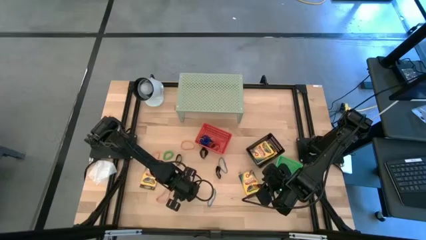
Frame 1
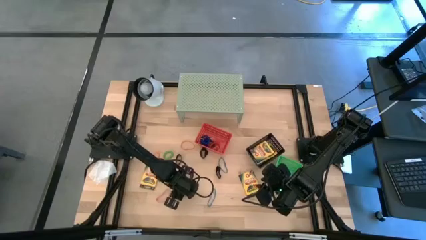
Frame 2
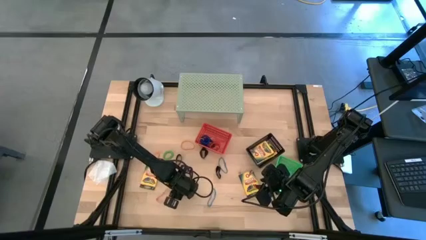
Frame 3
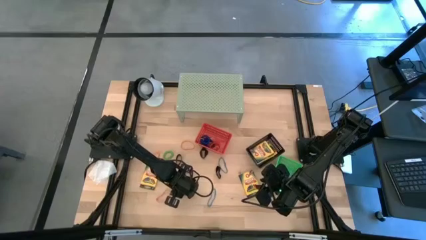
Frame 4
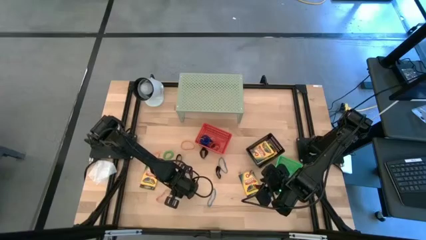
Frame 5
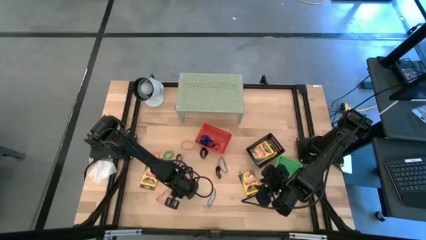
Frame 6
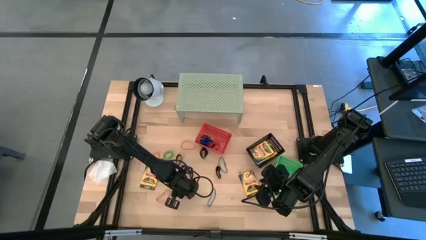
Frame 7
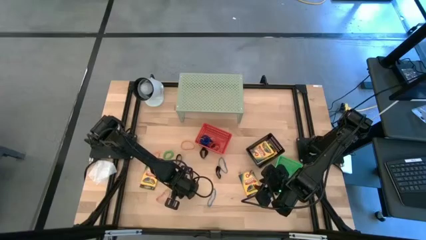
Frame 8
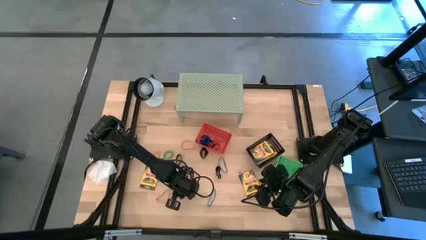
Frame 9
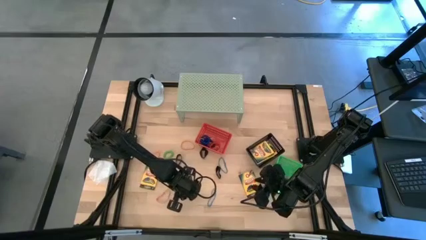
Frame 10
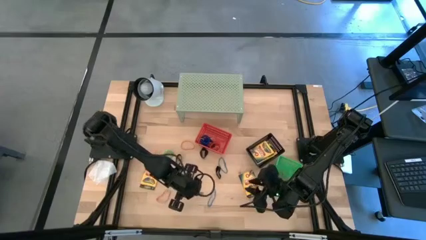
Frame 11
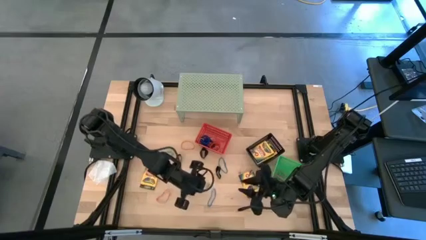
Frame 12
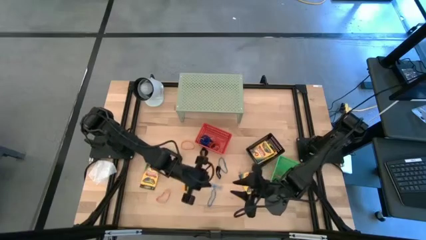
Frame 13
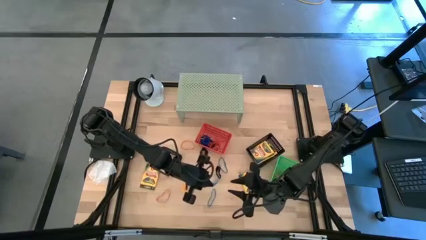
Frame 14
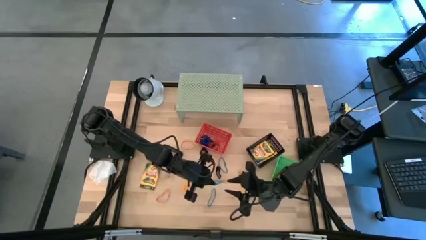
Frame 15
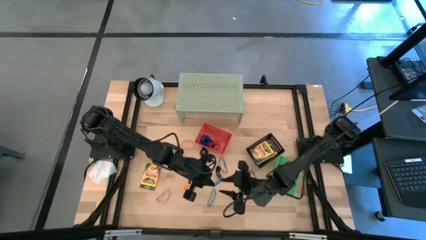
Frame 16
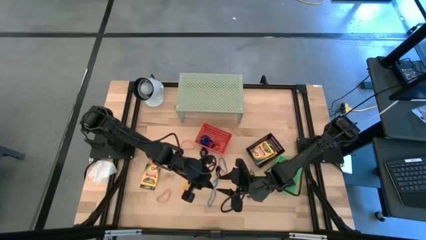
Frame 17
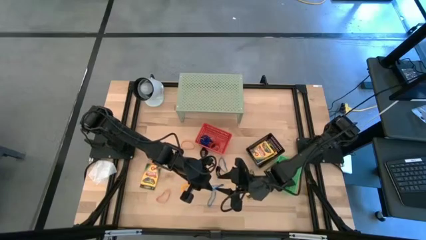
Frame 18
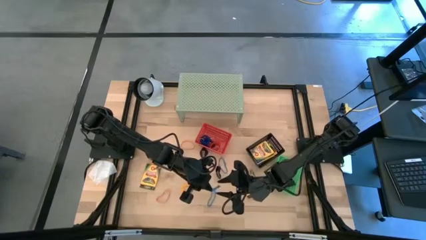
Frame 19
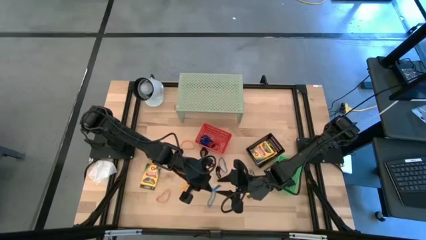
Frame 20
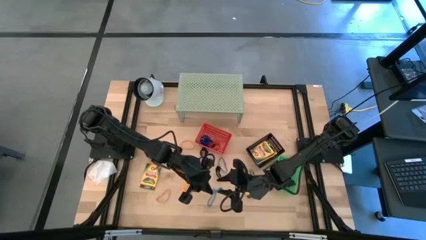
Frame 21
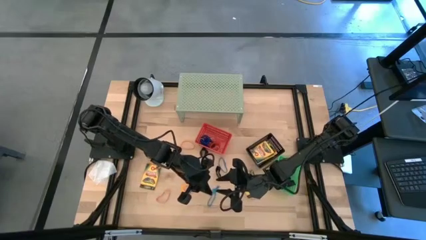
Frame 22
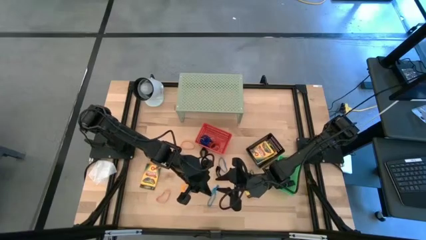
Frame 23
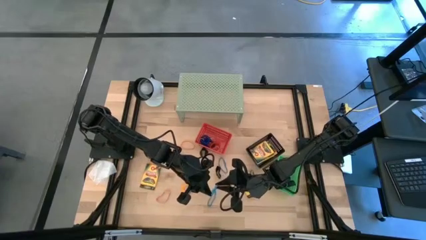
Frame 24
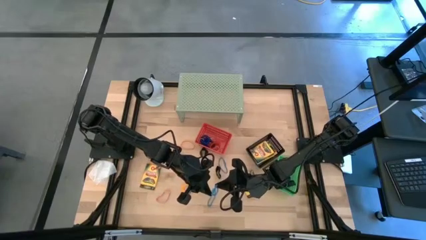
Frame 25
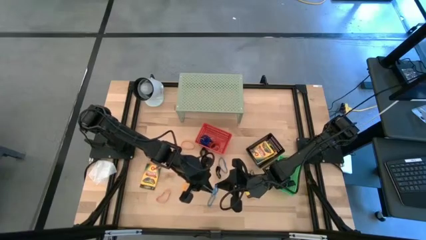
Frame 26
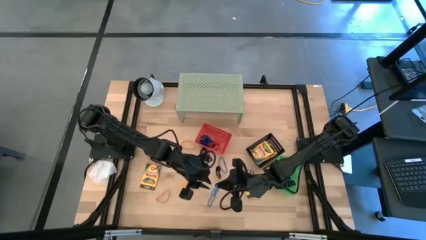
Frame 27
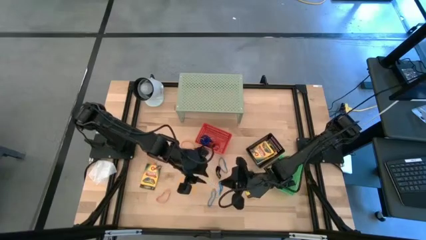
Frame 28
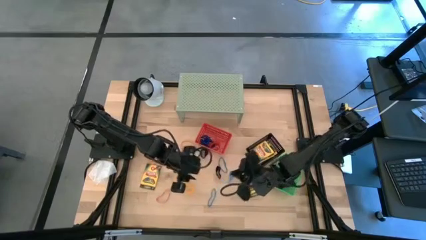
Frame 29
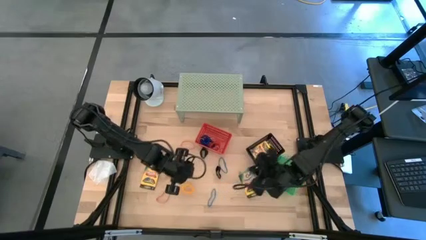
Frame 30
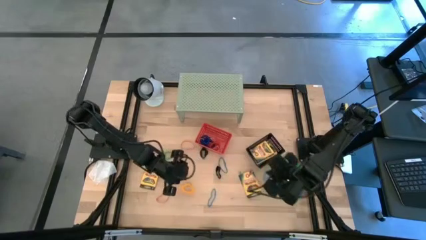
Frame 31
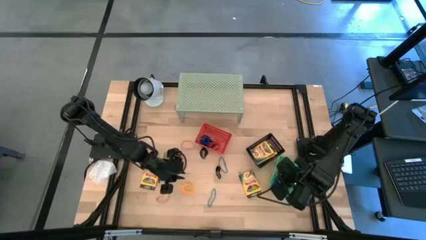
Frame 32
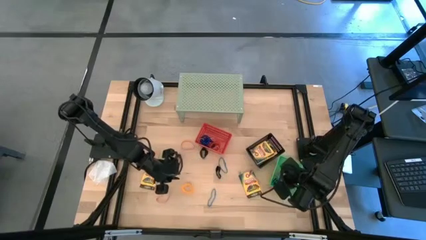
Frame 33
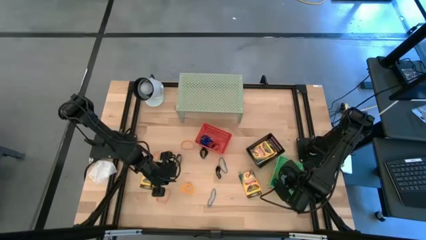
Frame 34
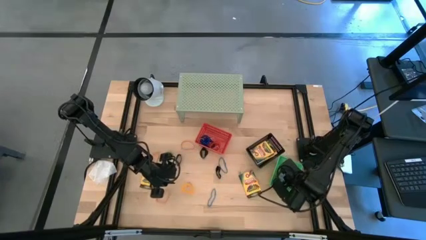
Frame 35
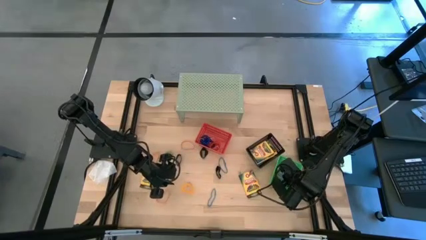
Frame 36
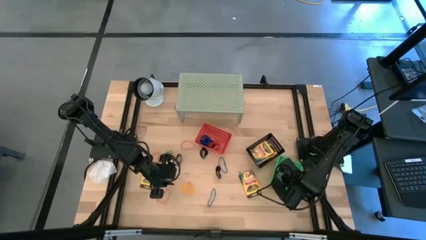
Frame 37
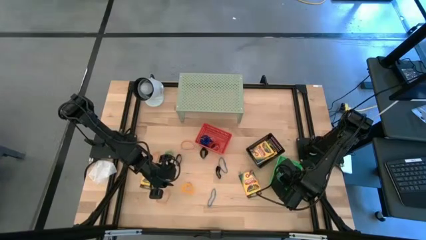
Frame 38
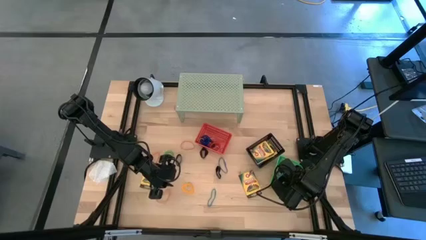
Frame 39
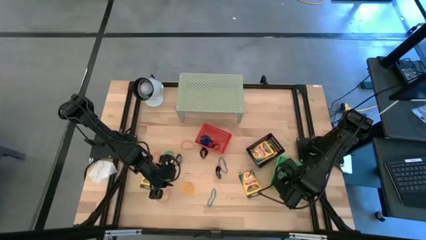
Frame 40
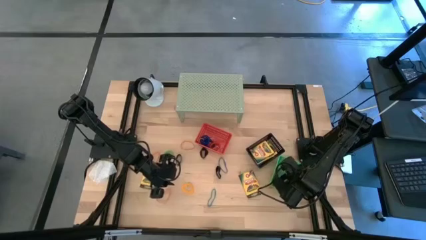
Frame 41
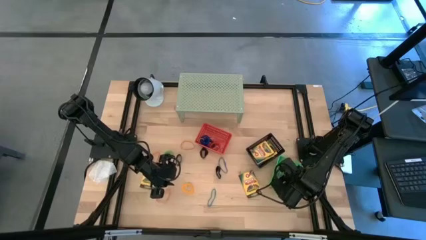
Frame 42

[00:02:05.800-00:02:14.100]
Task: Pick & Place Office Desk Supplies
Put the blue rubber band into the green bin

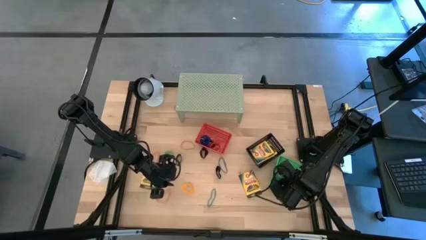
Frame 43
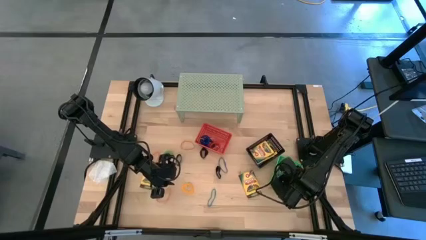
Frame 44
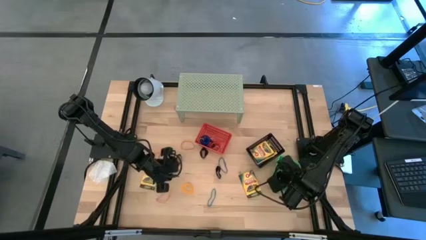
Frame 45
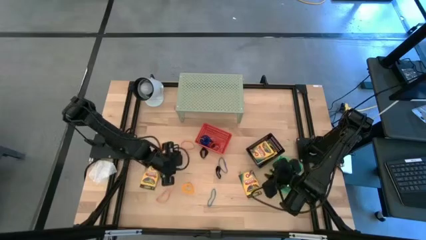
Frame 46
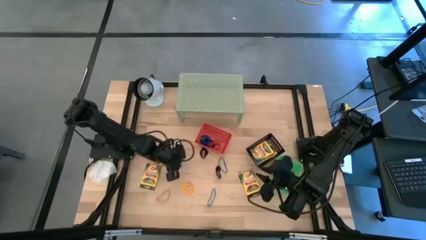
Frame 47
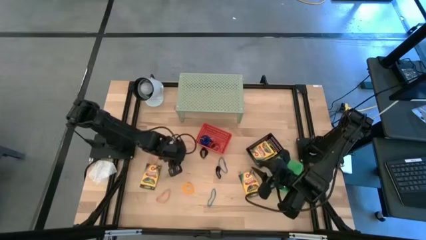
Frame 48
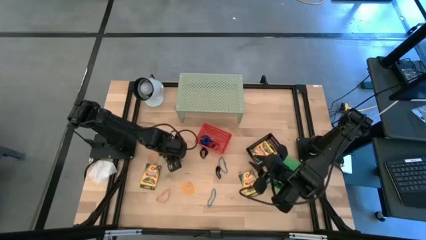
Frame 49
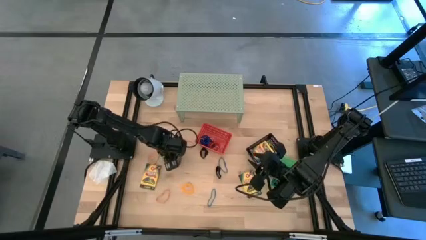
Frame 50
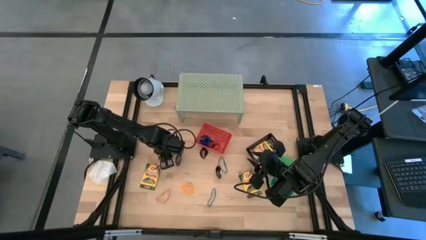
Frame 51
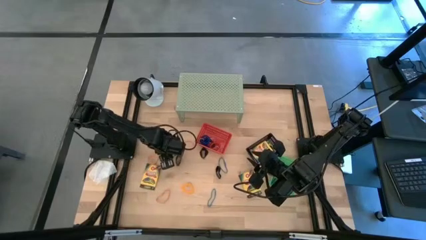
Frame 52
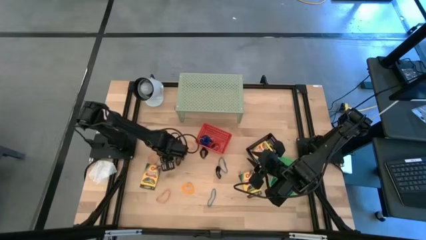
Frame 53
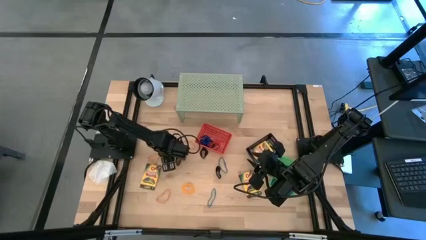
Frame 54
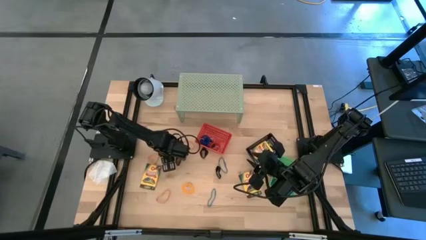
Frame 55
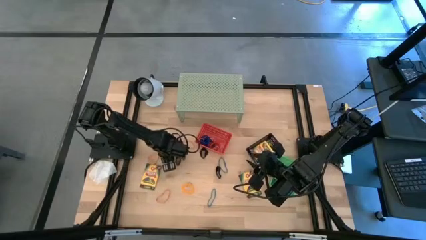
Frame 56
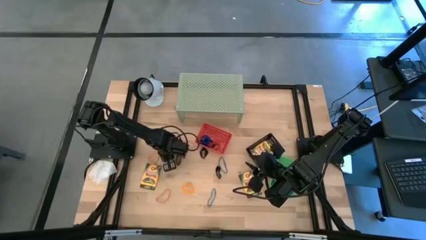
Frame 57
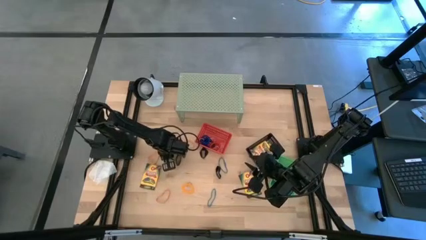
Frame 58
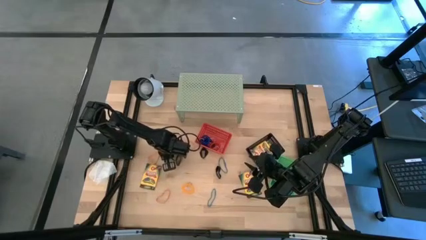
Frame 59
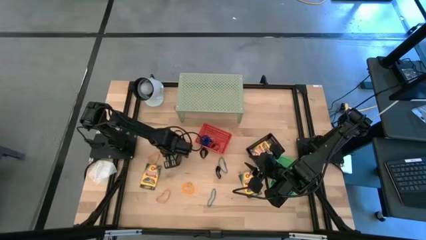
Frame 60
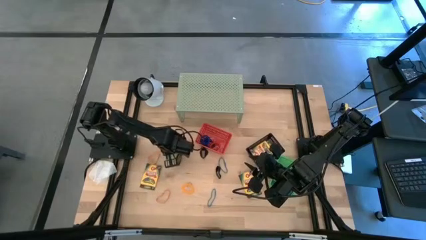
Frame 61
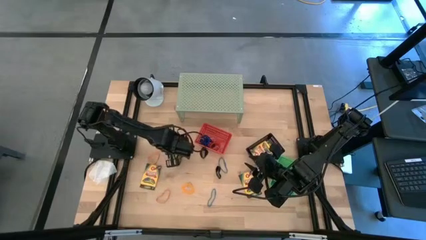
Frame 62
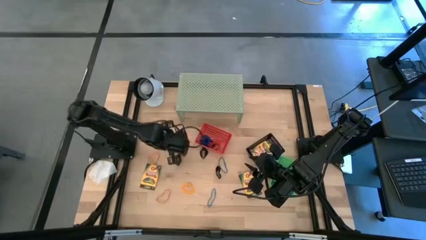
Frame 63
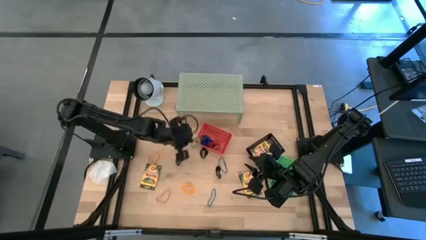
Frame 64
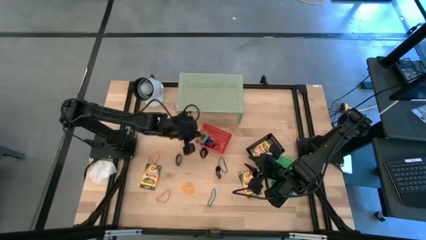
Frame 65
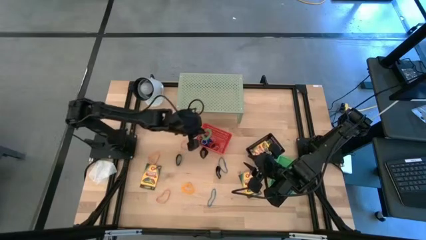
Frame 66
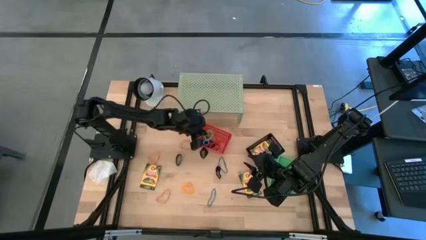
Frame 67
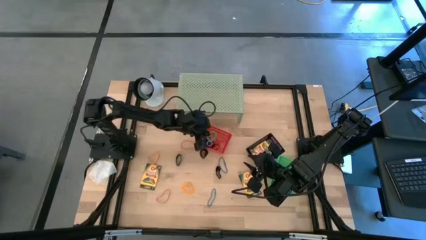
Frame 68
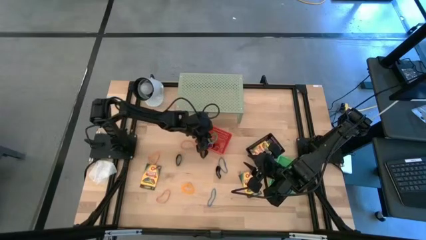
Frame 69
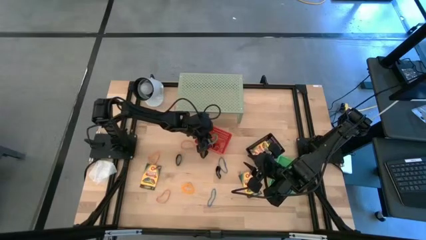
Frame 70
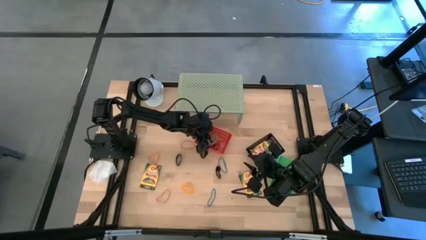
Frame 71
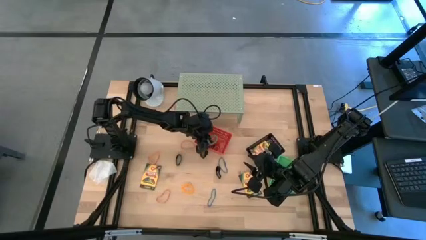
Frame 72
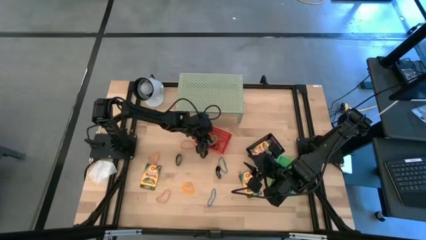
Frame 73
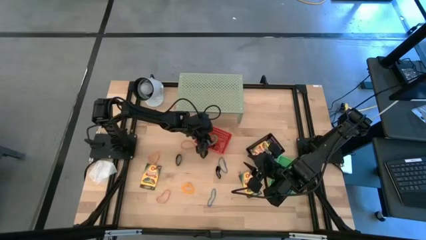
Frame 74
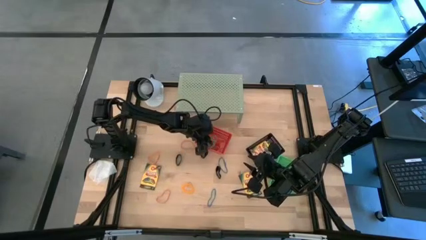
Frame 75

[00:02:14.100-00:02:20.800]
Put the green spring keychain into the red bin
